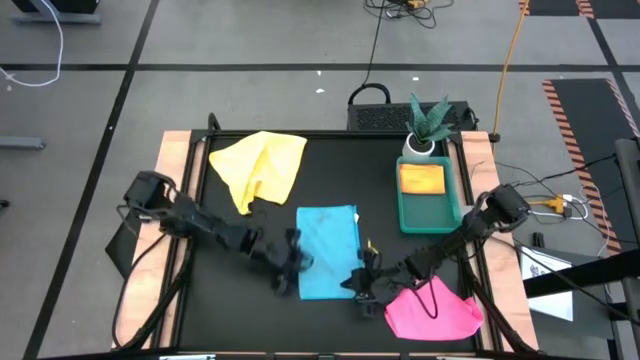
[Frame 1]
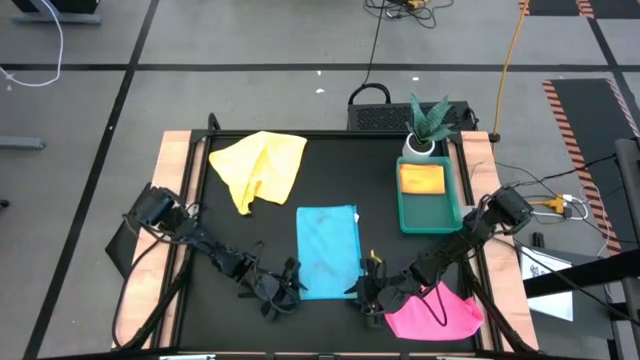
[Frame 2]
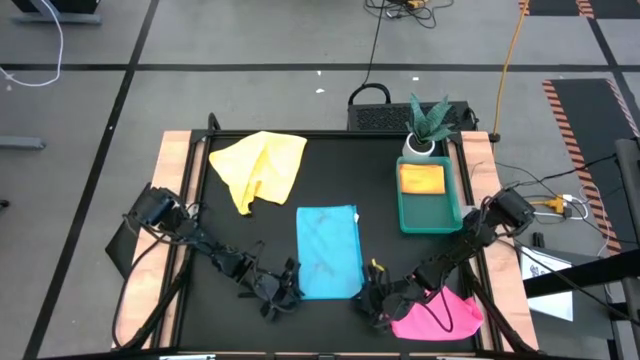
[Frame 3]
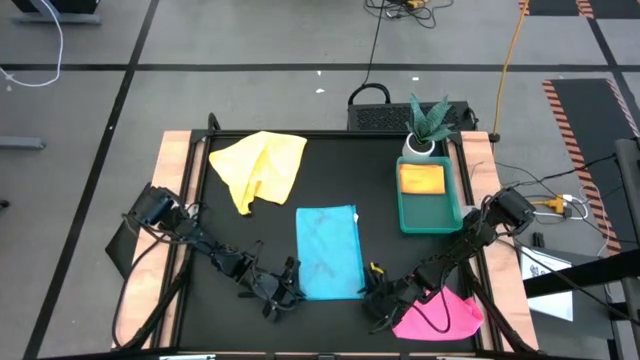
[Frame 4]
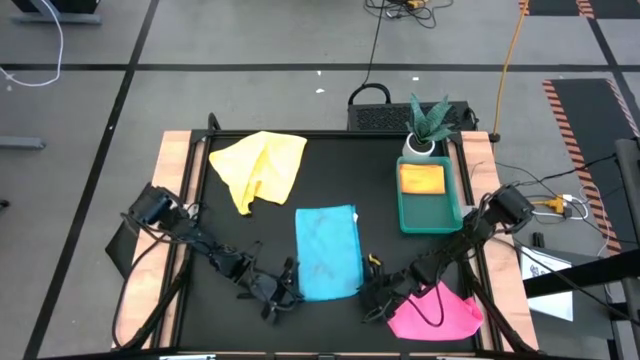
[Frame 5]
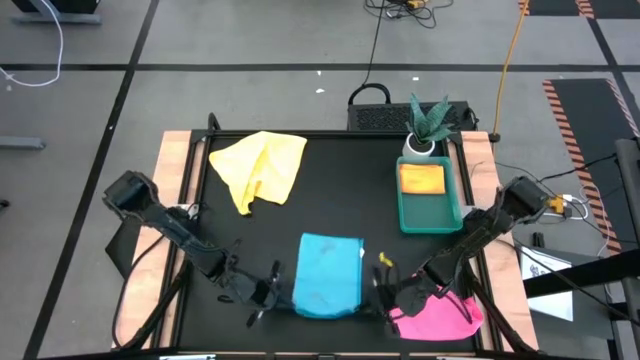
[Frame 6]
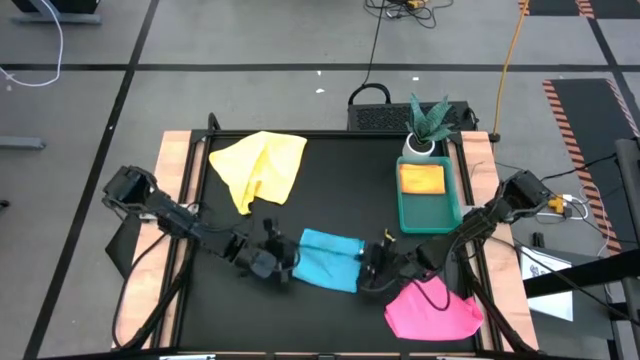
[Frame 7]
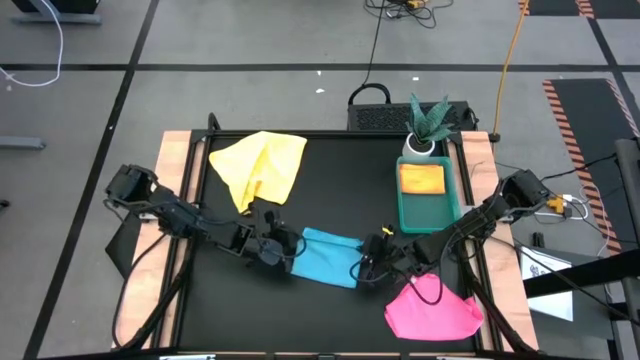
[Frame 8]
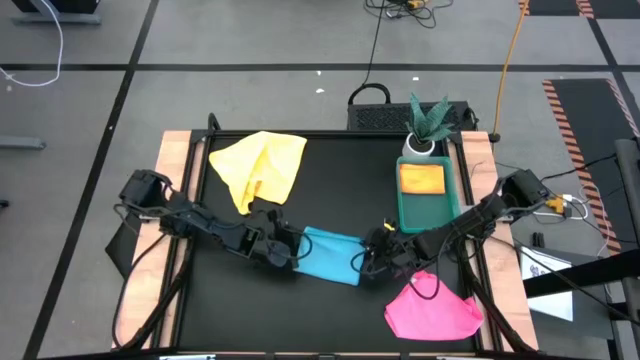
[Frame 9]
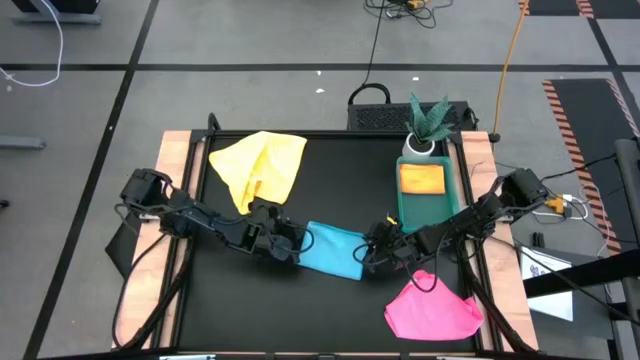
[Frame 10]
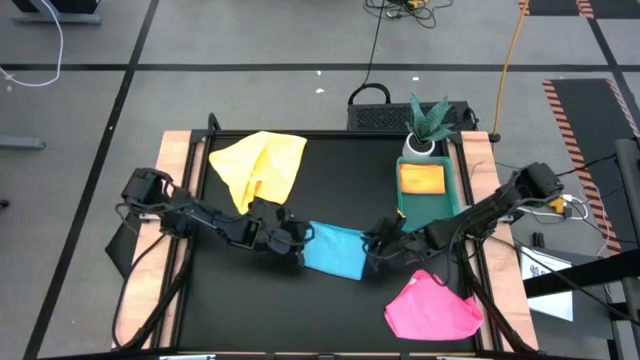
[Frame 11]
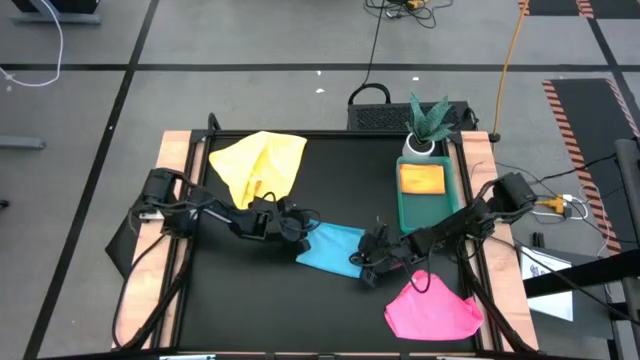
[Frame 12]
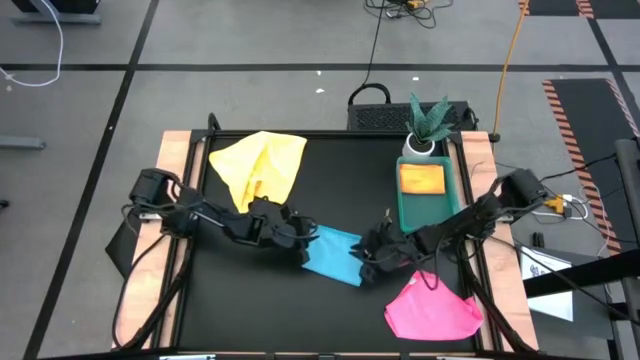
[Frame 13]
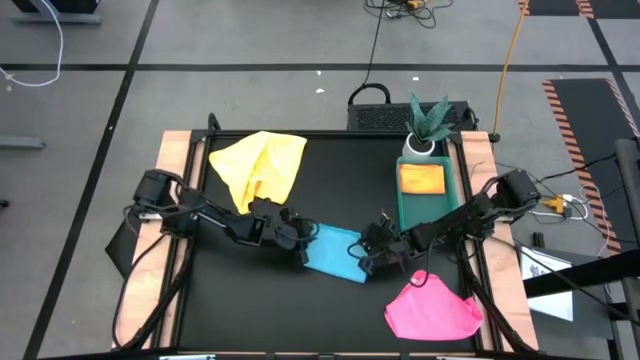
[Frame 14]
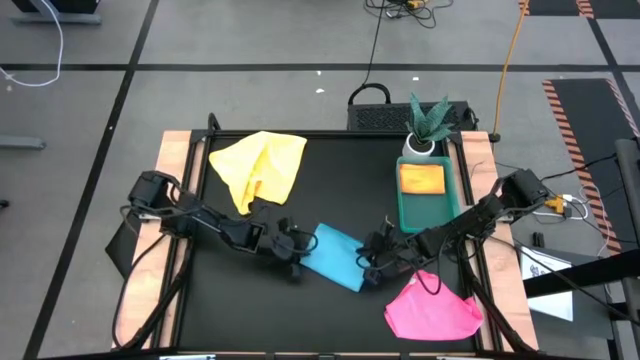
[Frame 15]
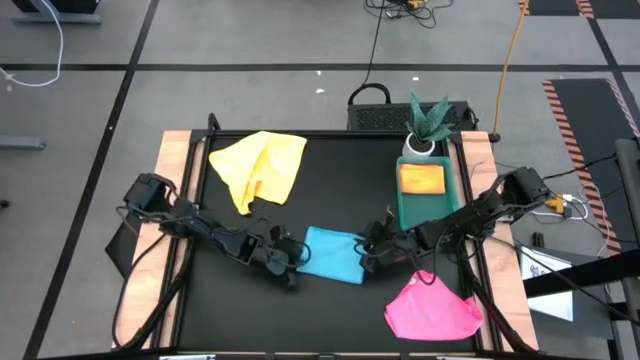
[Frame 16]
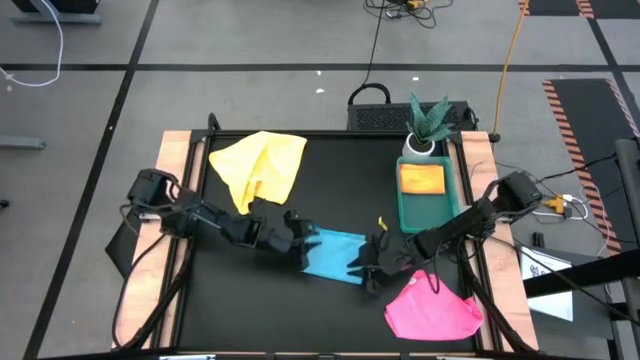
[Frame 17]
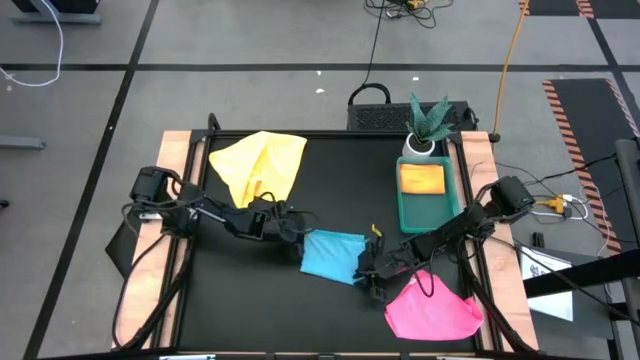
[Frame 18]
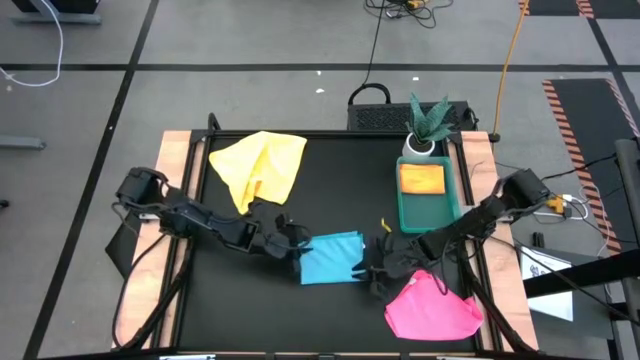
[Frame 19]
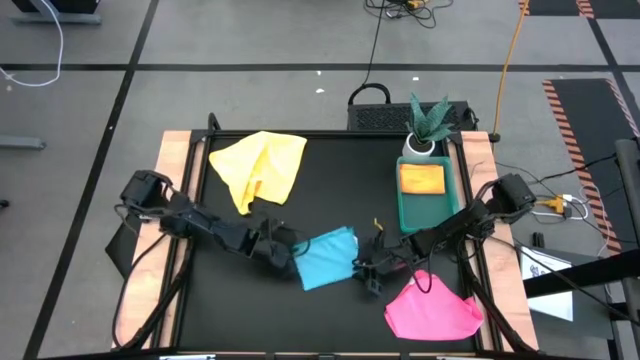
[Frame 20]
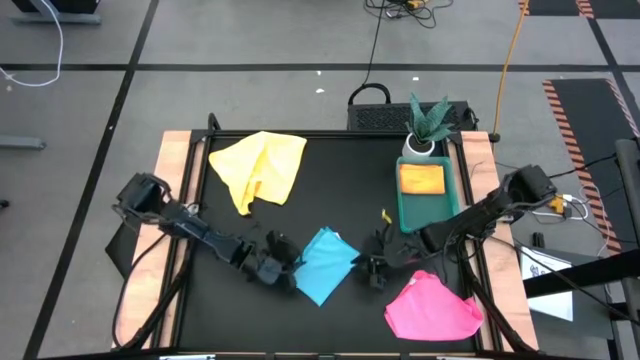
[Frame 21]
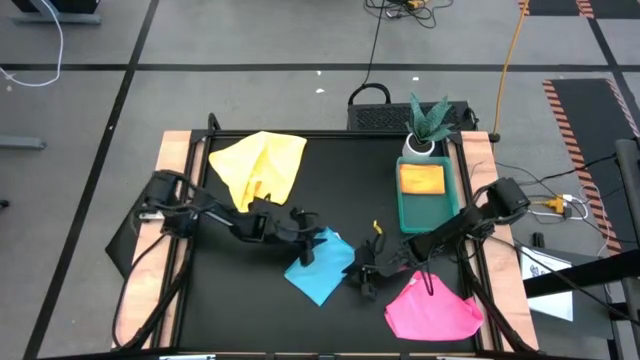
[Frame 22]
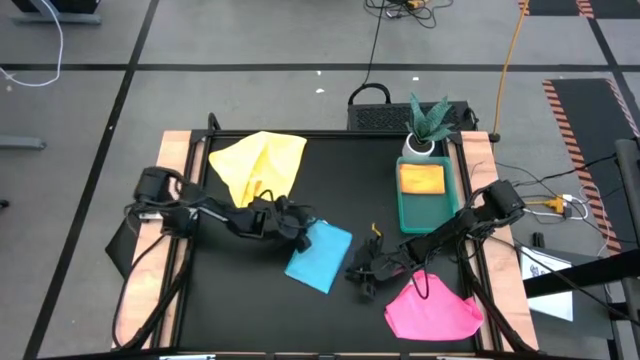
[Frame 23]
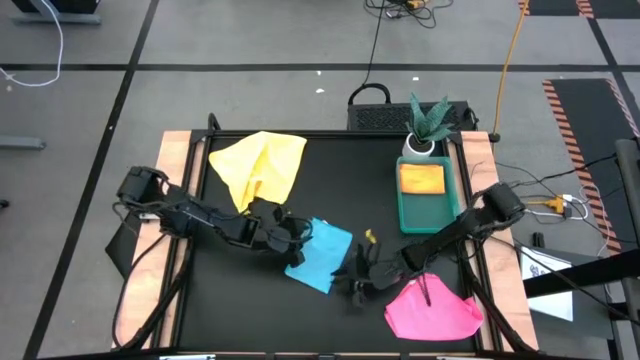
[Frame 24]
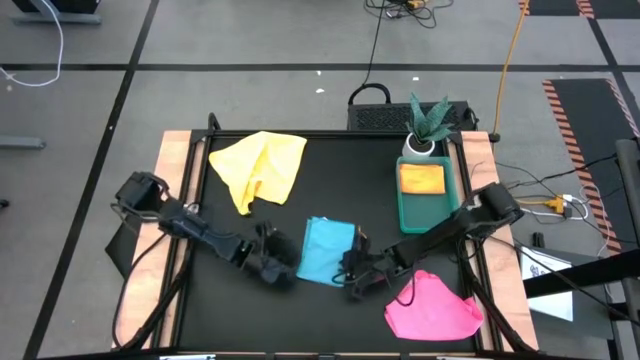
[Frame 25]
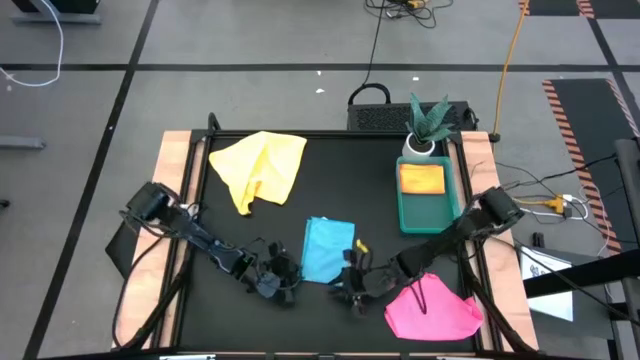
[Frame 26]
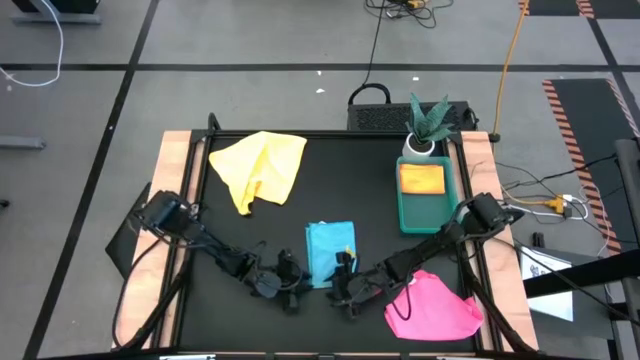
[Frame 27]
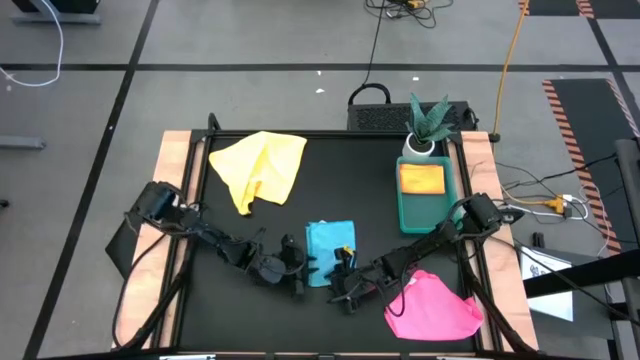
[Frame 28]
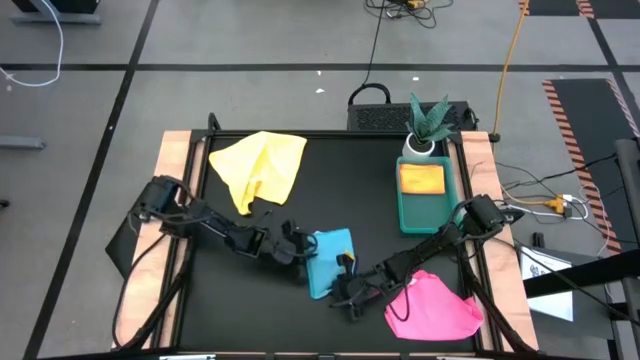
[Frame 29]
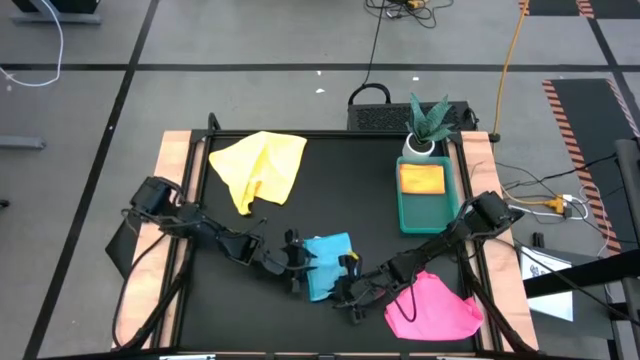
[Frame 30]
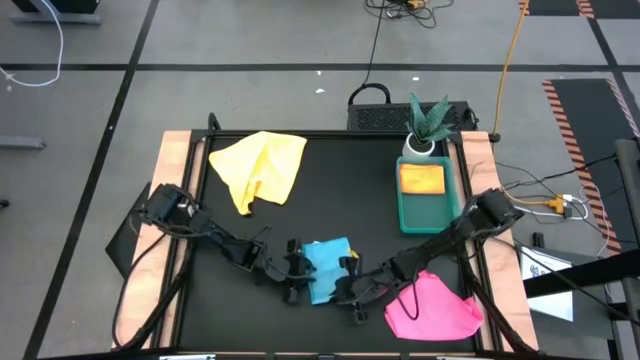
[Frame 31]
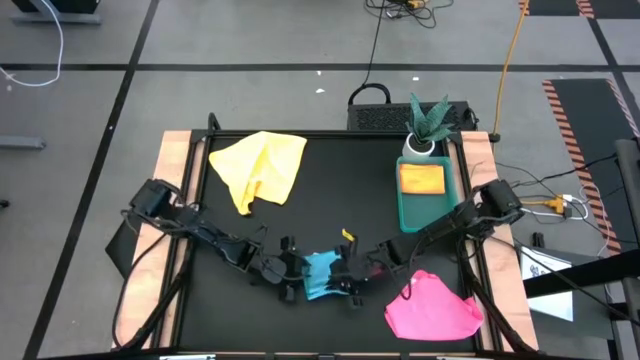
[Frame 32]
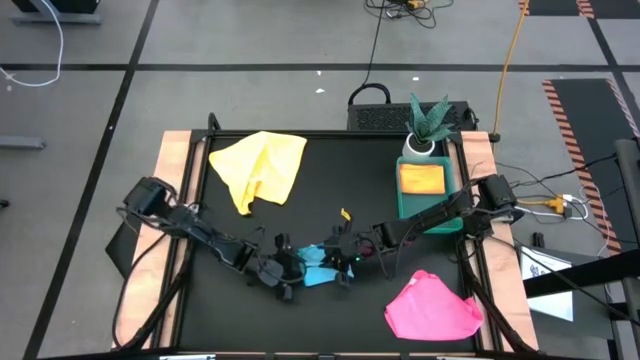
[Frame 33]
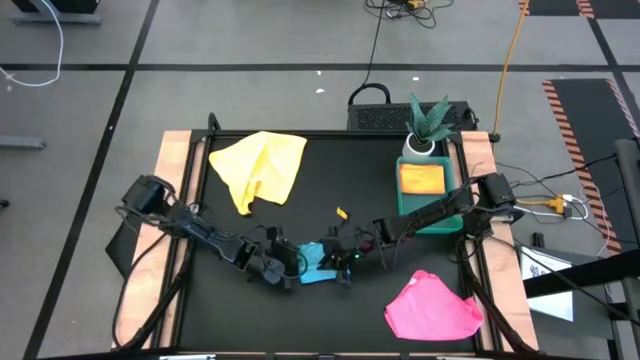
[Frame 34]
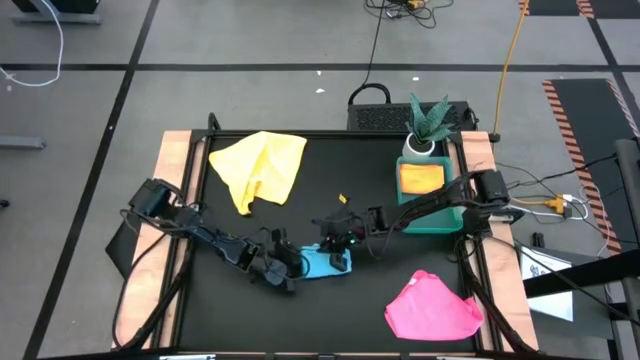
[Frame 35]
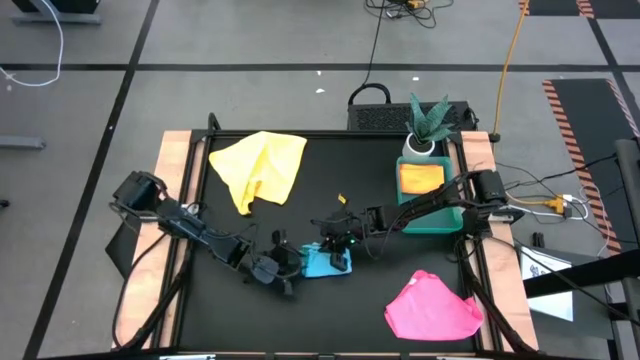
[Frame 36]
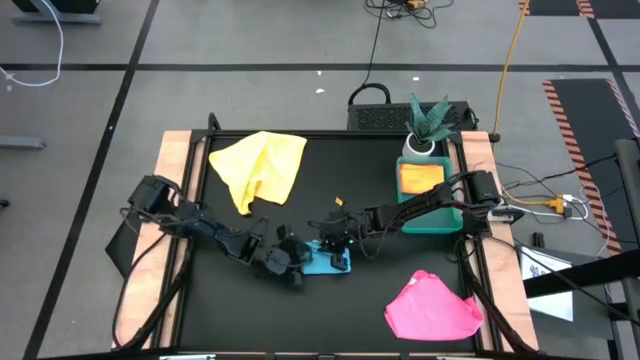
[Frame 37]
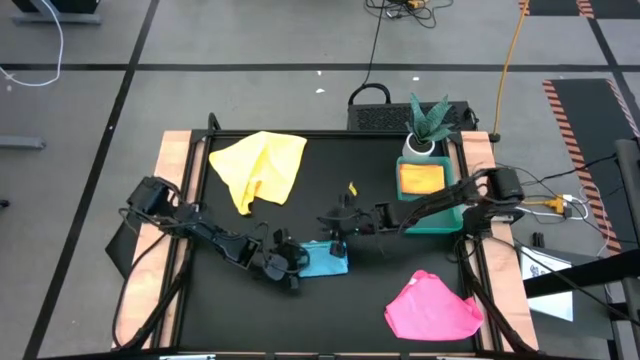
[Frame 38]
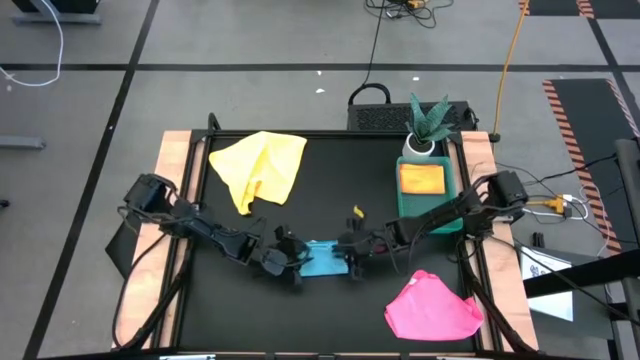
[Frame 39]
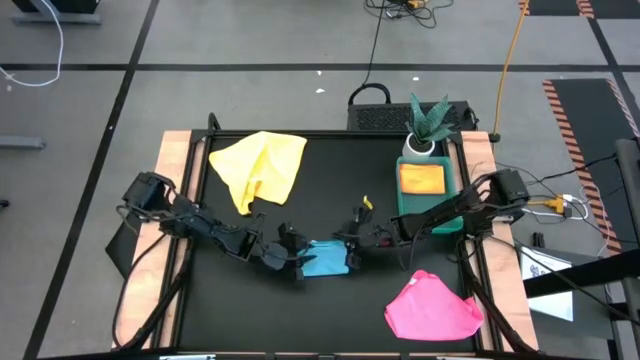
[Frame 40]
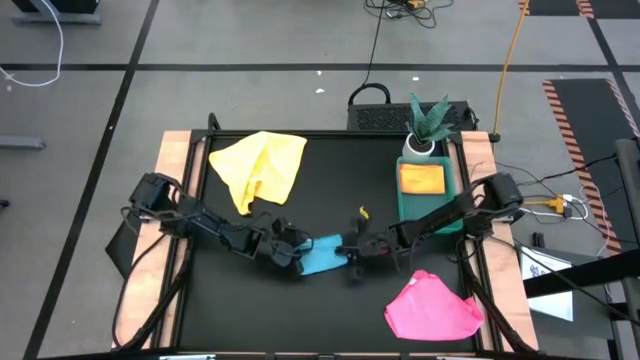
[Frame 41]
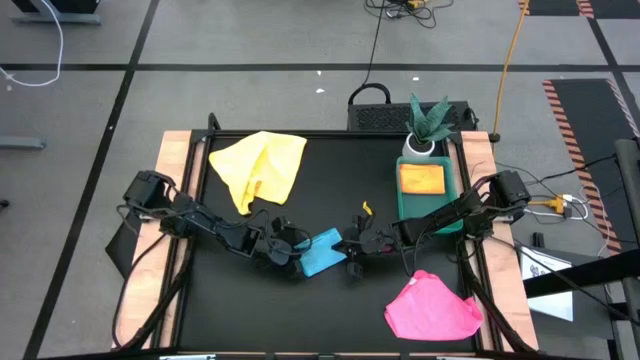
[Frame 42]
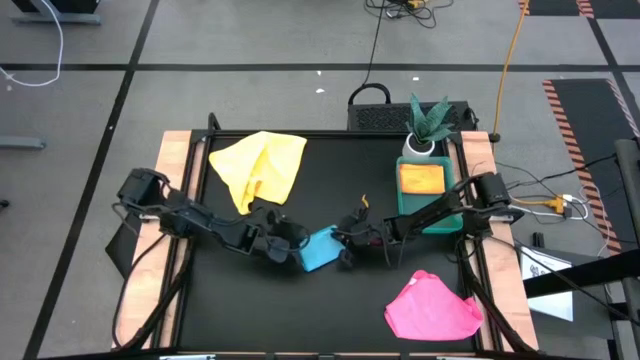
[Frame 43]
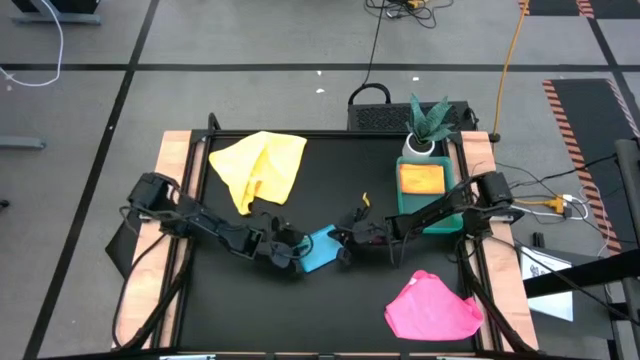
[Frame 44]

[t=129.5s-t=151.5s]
Task: Fold microfiber towels
Fold the blue microfiber cloth
